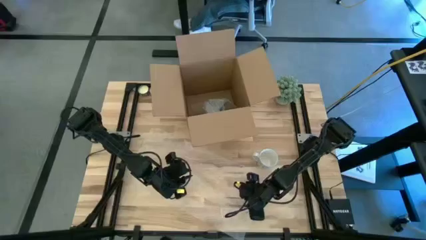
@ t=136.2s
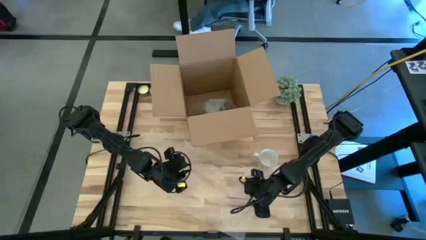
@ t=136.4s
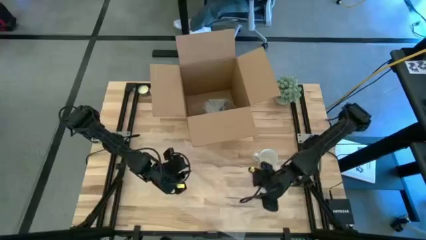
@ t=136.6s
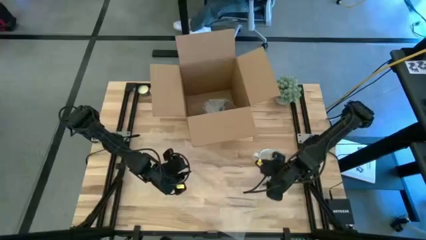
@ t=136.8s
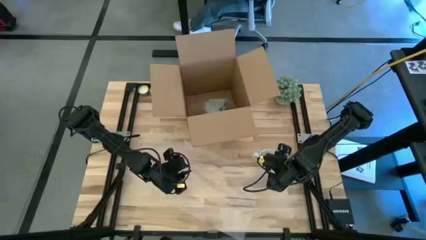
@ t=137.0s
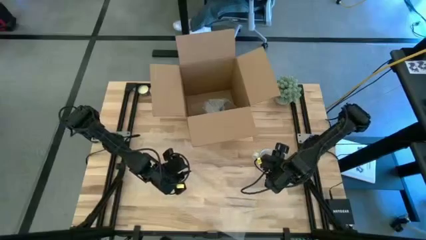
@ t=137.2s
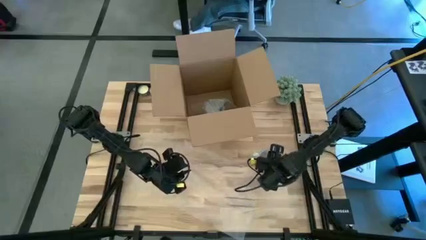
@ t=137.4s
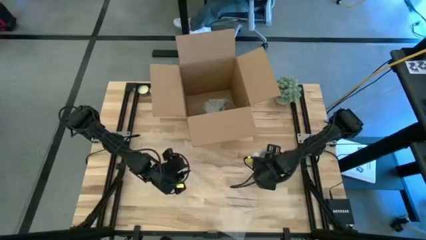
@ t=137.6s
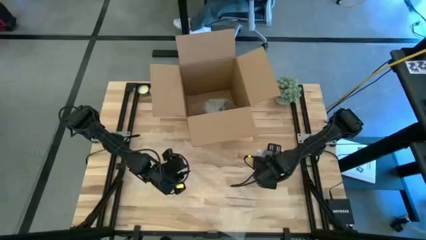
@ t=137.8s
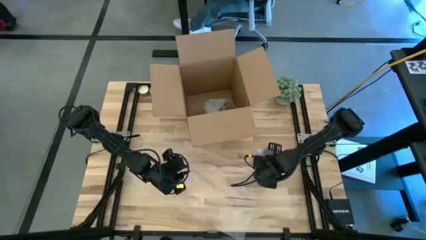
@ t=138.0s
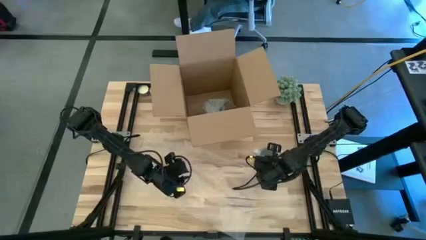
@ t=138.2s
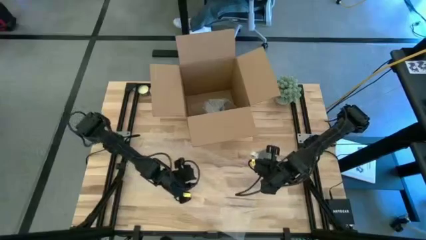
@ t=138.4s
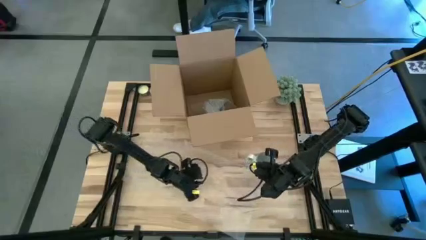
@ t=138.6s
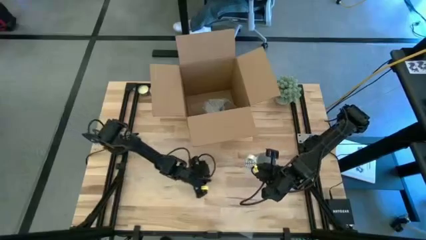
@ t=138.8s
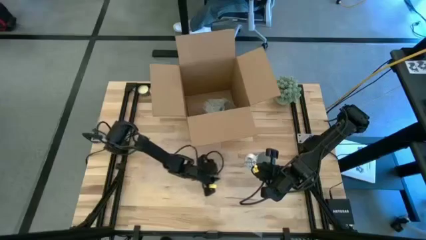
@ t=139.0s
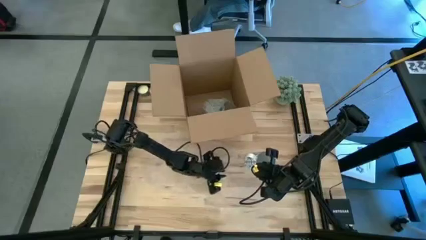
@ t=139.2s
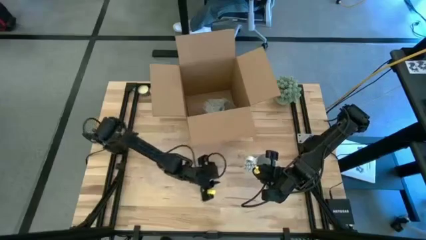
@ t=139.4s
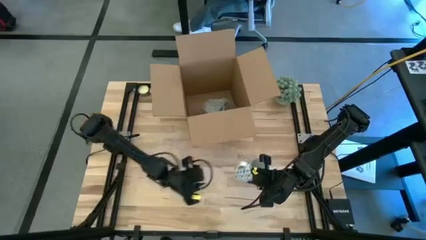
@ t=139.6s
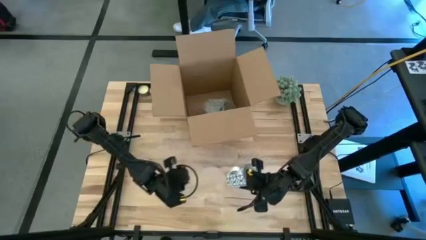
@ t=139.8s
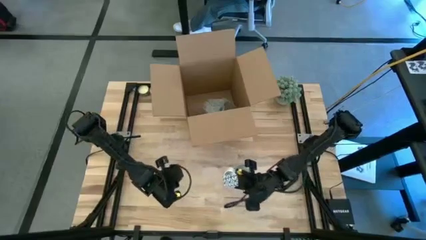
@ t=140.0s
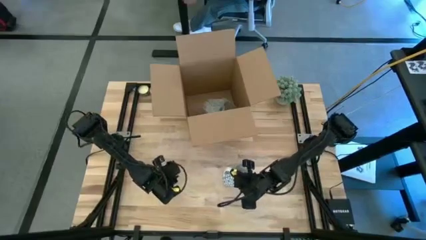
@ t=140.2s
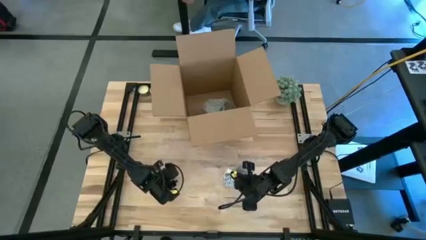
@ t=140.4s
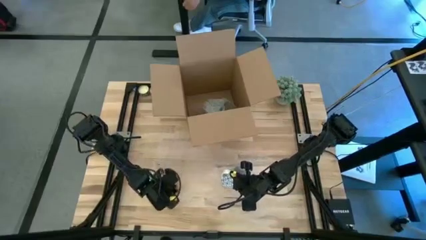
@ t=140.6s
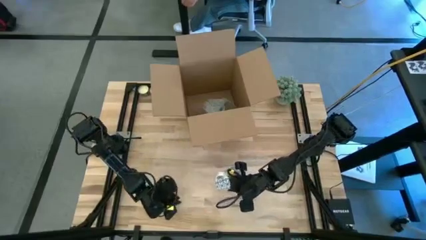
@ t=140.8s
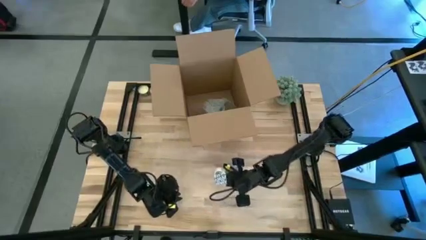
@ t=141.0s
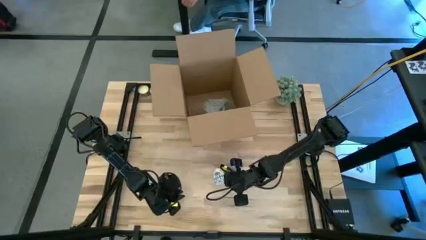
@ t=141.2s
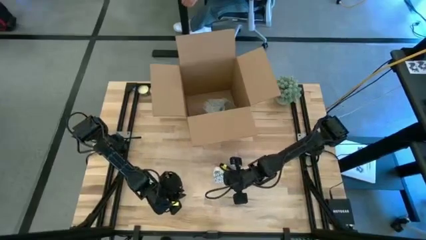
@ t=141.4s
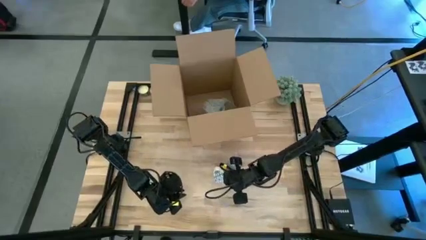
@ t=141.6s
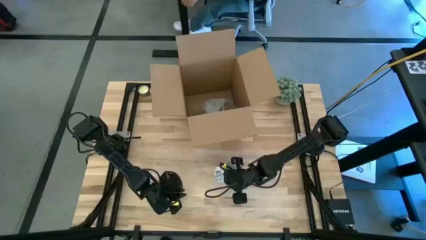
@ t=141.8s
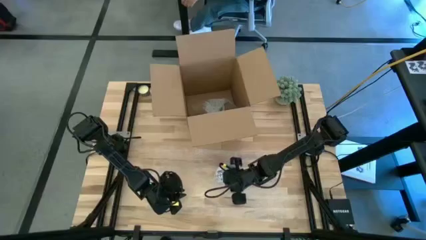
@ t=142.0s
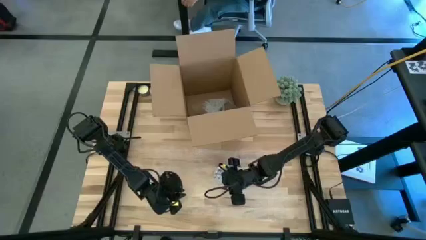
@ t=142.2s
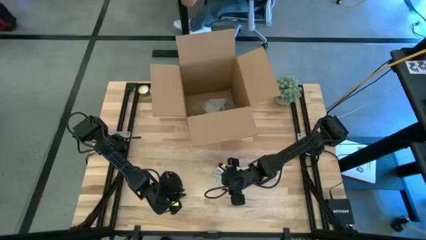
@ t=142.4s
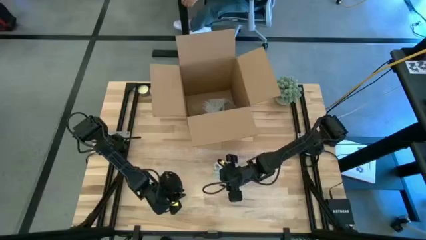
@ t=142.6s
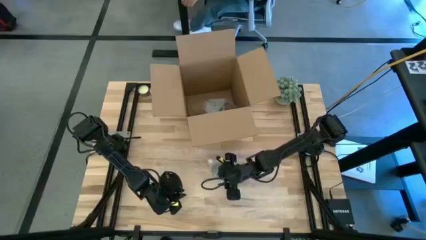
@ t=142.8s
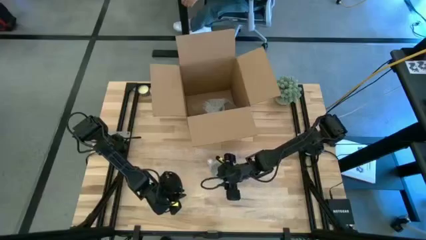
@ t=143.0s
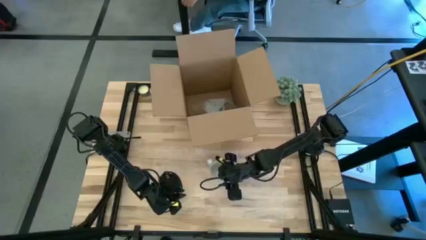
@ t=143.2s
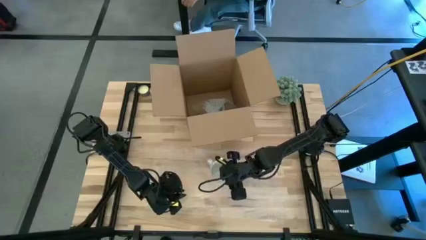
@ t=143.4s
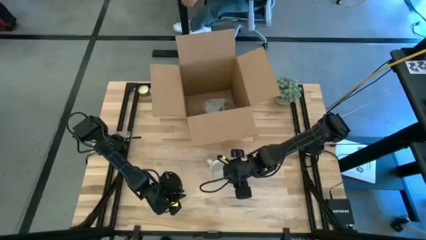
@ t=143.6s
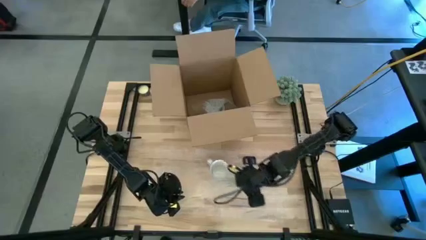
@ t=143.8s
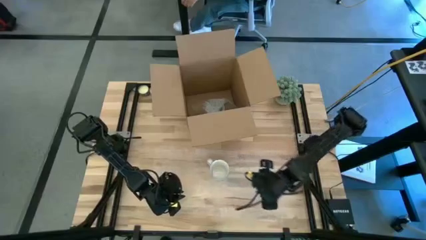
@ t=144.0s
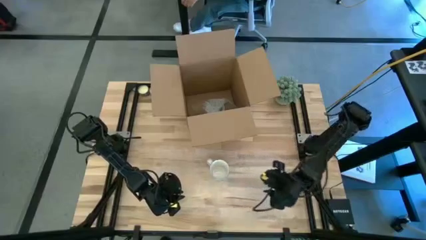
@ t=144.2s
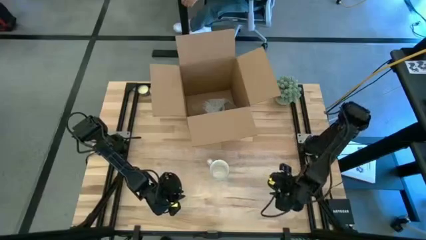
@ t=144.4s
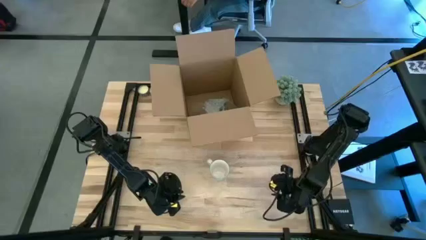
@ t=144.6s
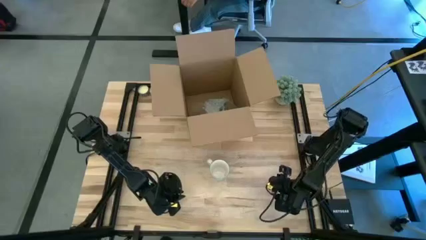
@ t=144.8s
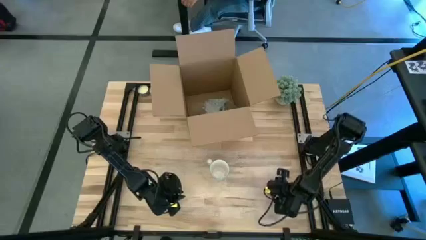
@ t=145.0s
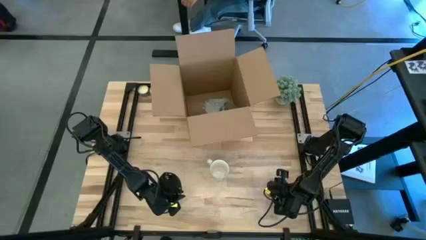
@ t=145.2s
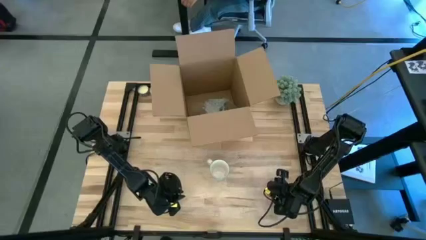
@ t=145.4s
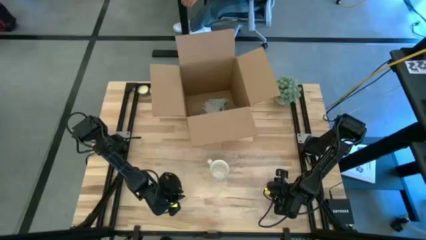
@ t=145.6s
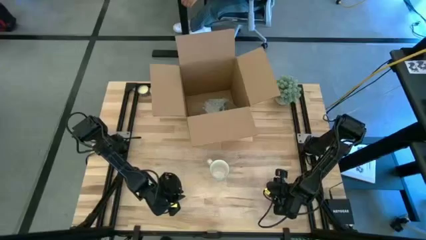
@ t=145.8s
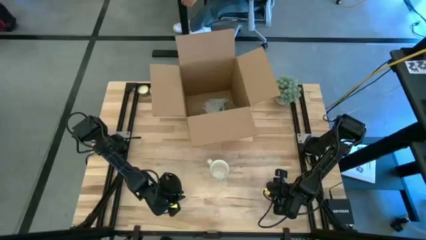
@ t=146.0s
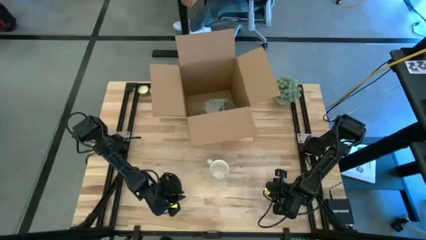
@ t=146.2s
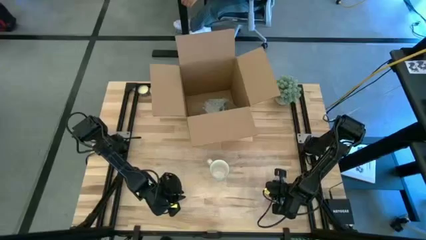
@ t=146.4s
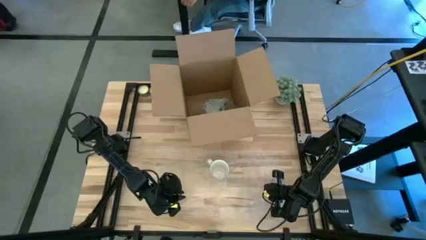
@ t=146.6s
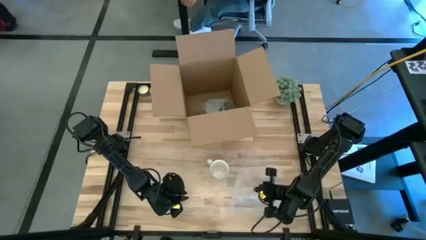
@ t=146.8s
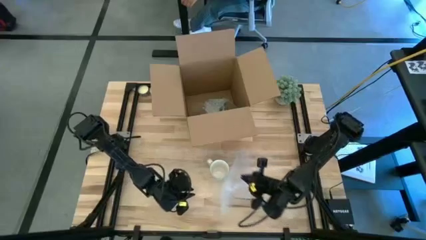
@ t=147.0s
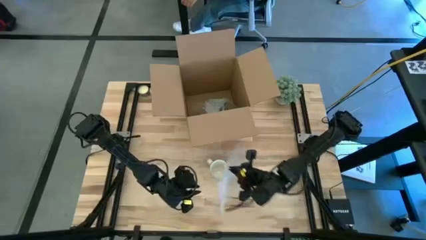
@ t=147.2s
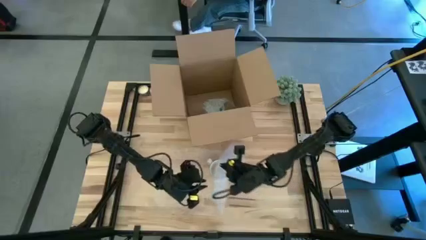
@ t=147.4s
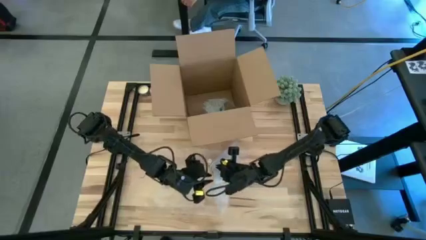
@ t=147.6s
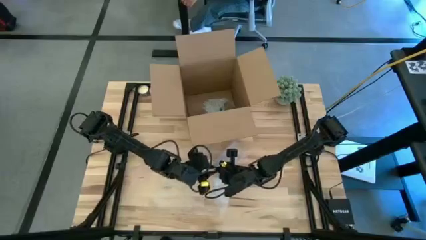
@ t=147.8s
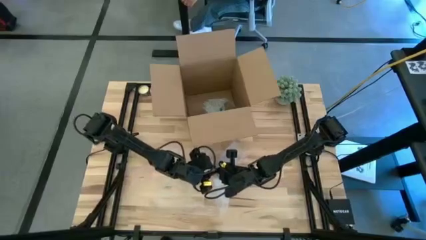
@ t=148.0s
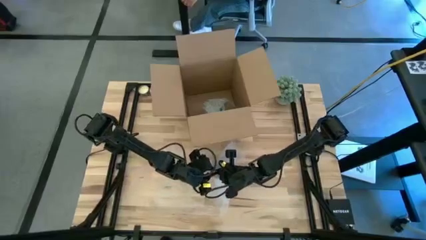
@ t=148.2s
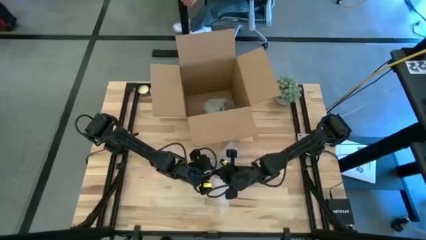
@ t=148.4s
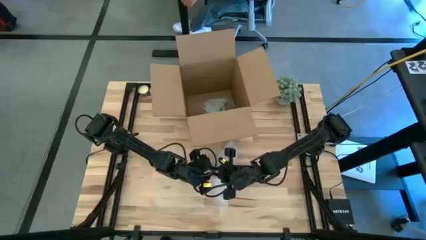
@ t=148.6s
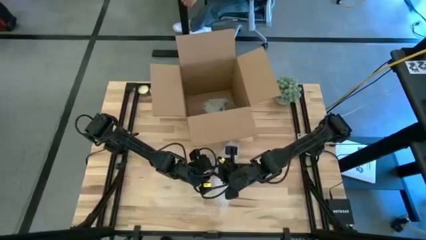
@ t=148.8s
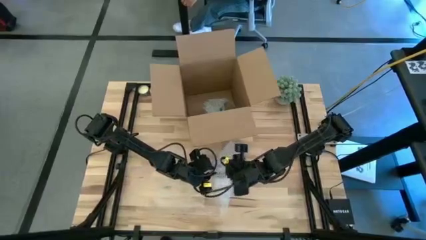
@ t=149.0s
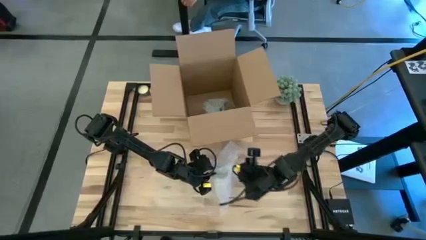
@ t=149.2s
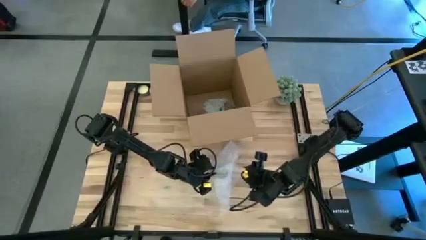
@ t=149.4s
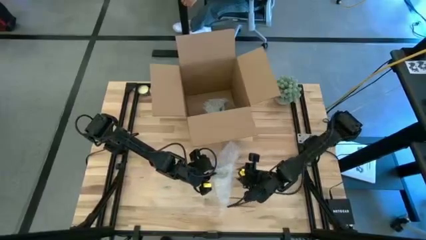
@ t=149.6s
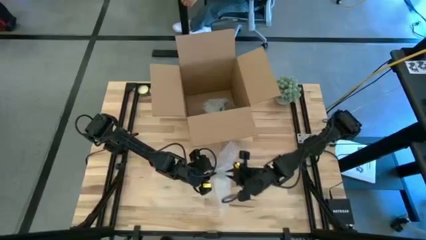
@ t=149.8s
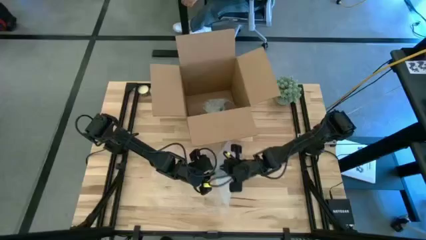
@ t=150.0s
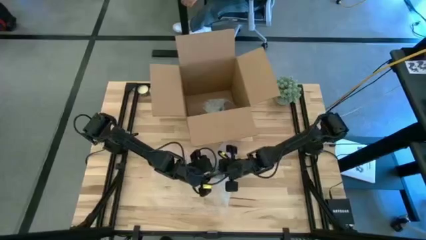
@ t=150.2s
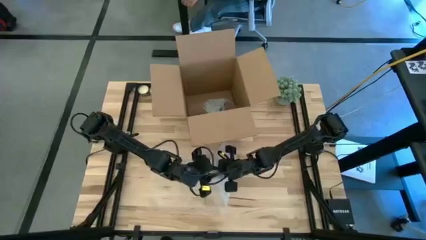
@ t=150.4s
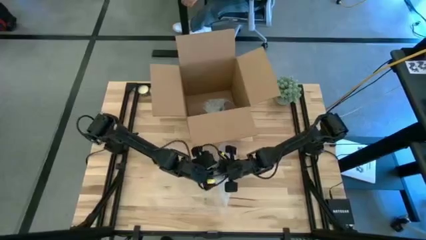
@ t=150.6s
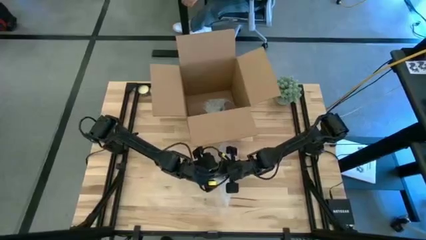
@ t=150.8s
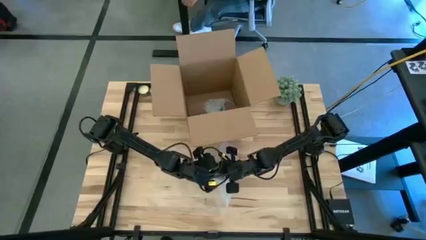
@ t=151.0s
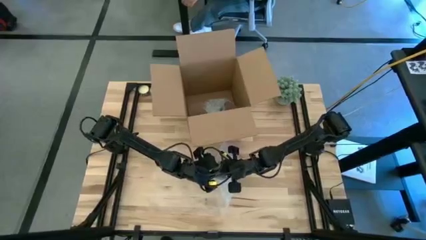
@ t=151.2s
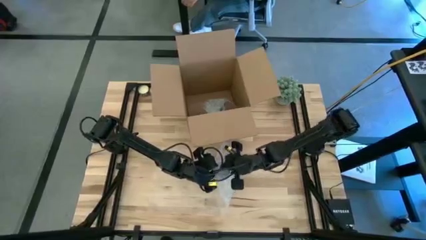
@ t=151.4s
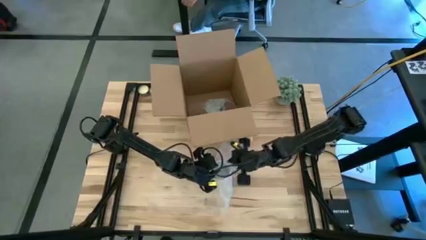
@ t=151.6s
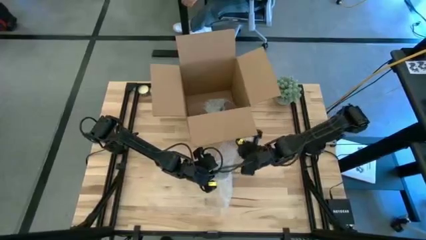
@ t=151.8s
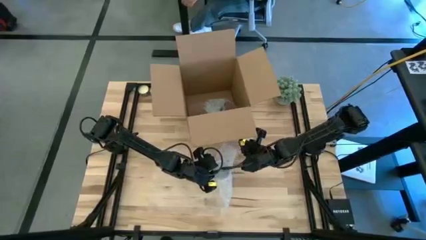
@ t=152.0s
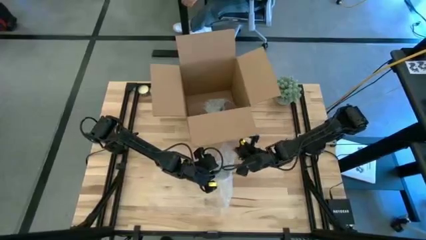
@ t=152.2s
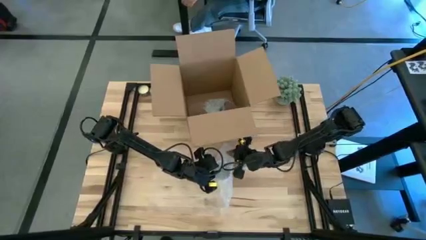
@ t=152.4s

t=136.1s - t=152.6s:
Task: wrap mug
Wrap the white patterned mug with the transparent bubble wrap
